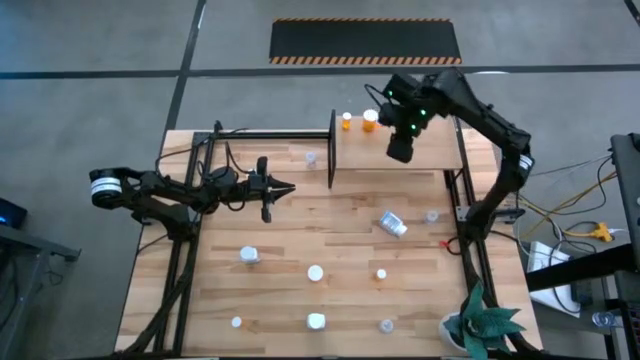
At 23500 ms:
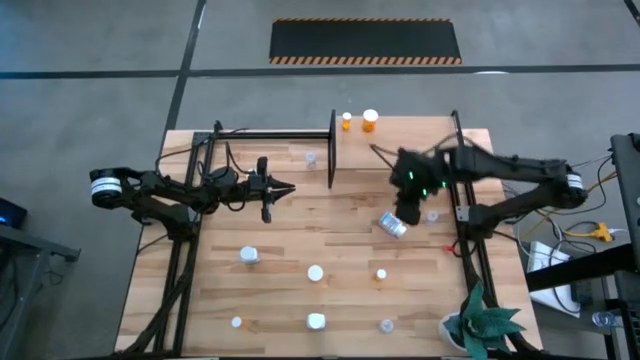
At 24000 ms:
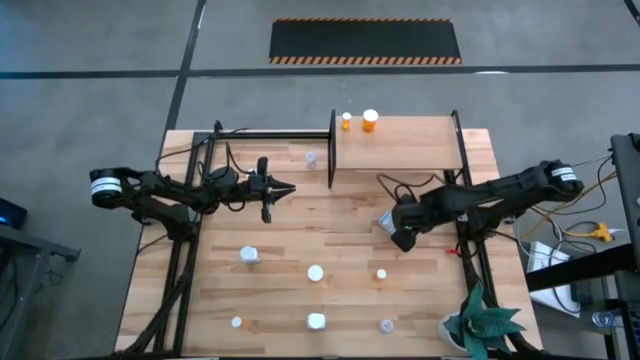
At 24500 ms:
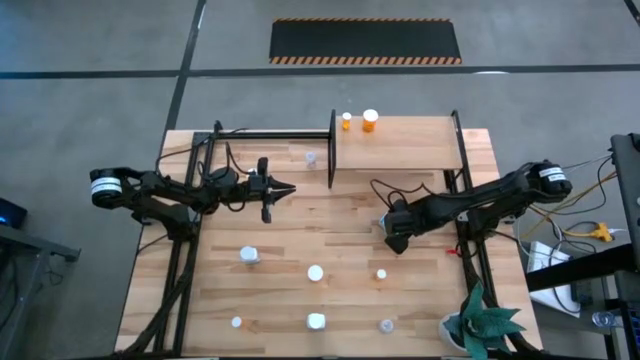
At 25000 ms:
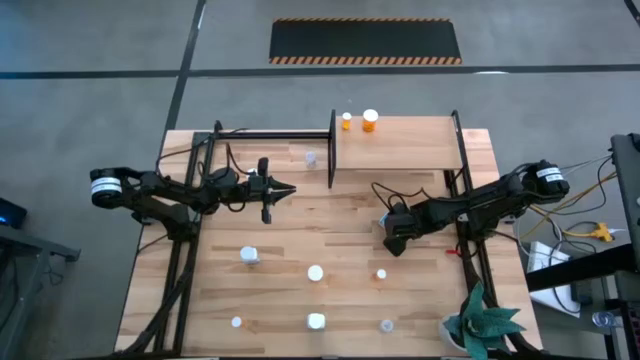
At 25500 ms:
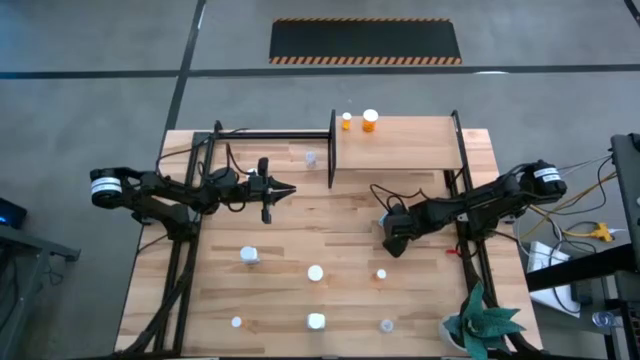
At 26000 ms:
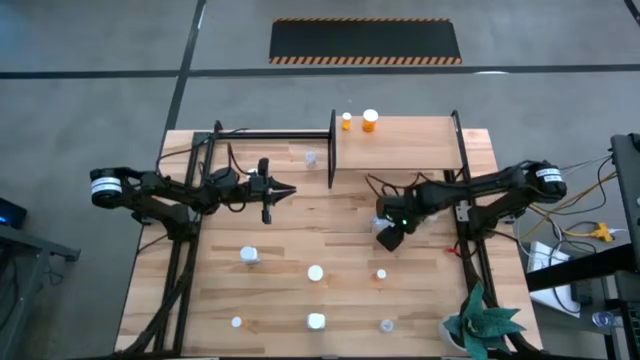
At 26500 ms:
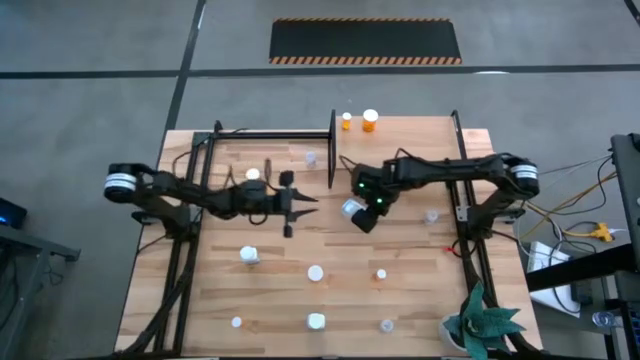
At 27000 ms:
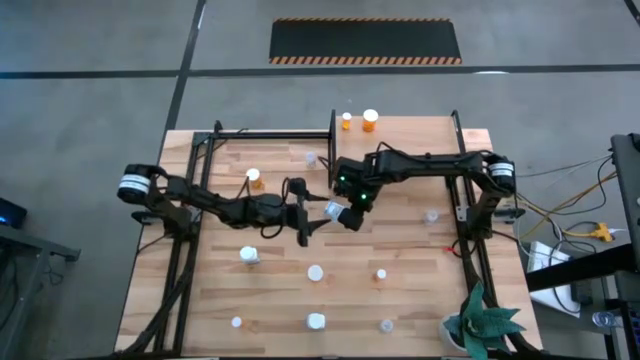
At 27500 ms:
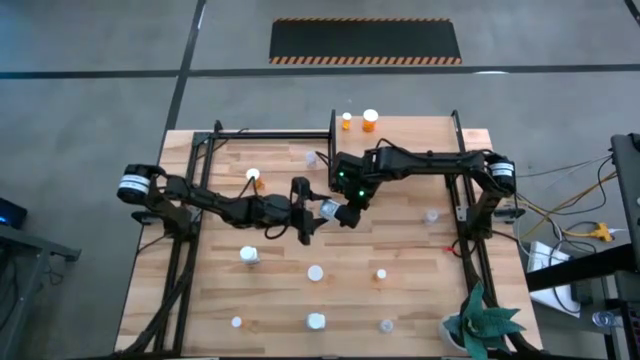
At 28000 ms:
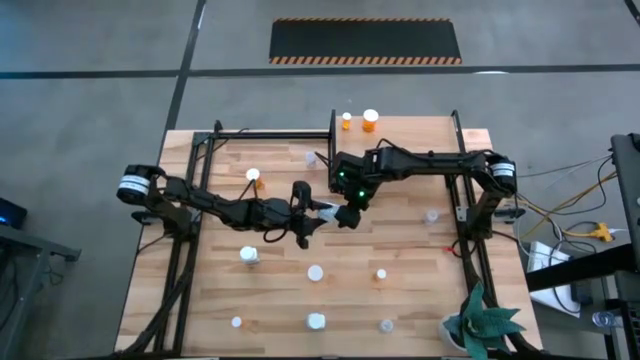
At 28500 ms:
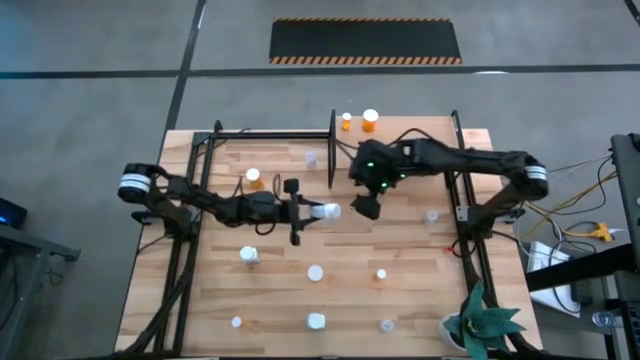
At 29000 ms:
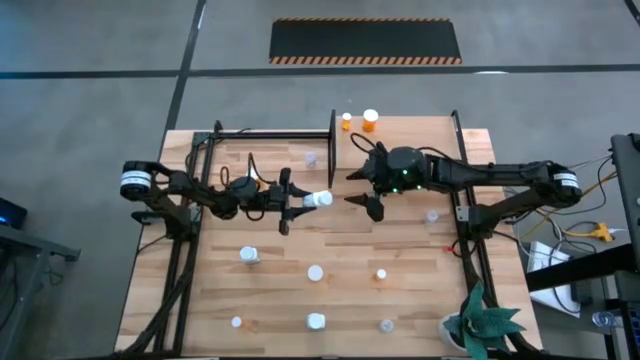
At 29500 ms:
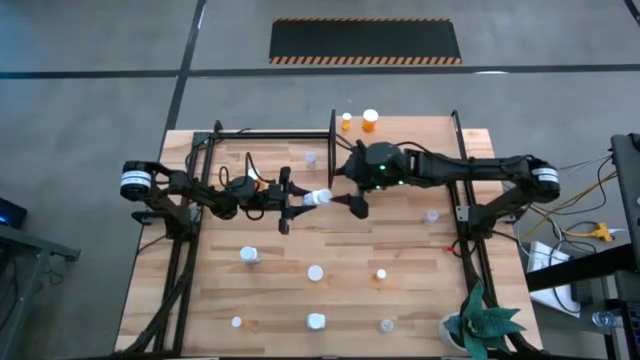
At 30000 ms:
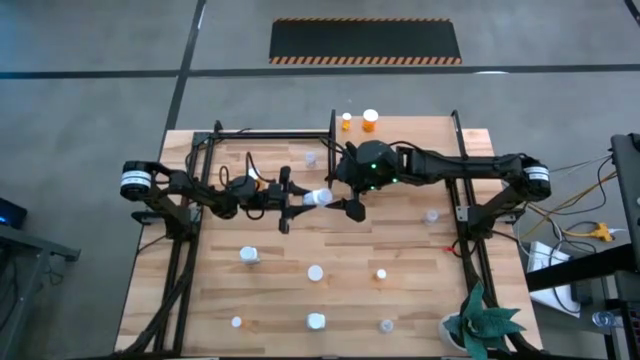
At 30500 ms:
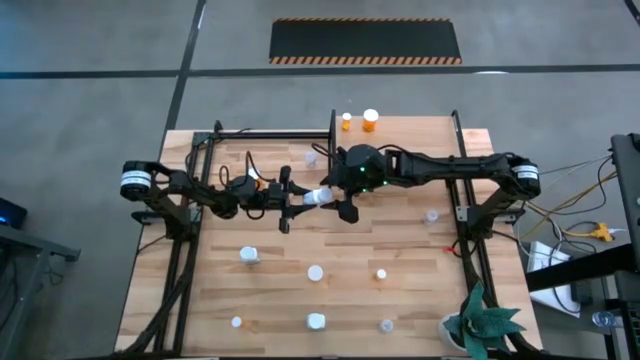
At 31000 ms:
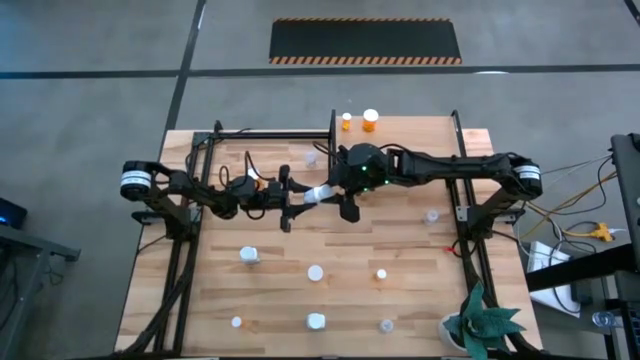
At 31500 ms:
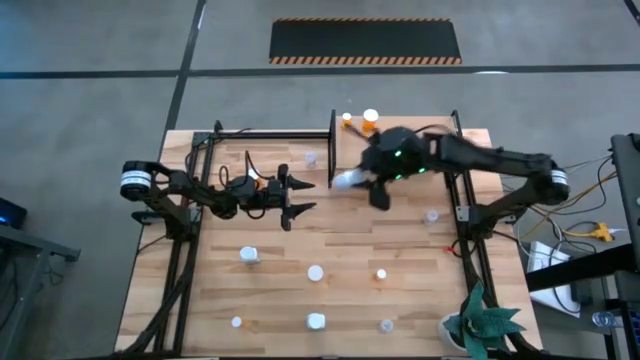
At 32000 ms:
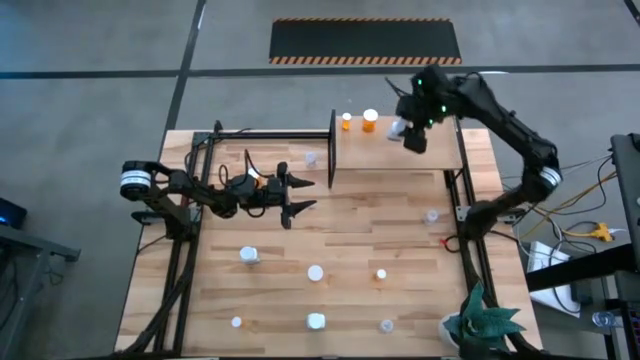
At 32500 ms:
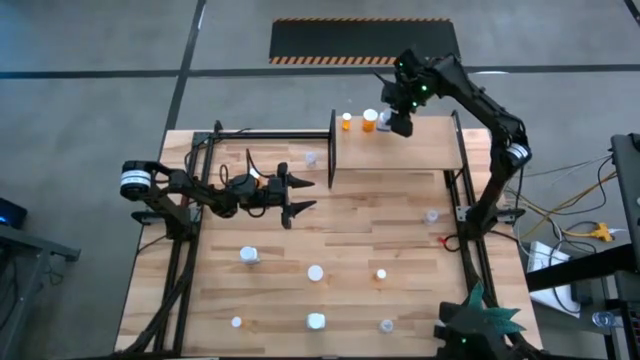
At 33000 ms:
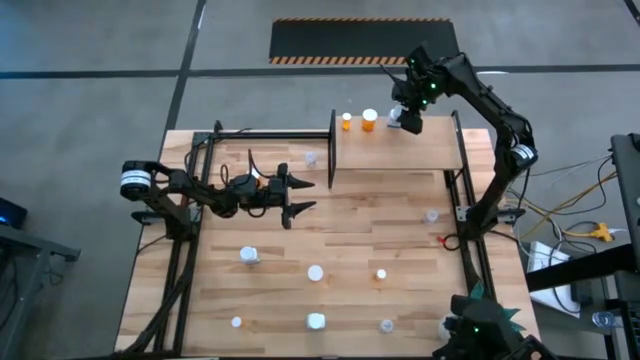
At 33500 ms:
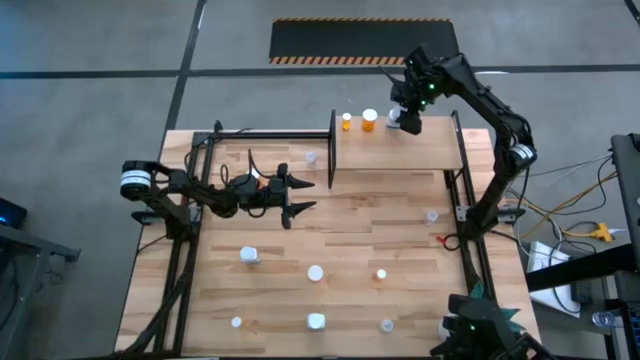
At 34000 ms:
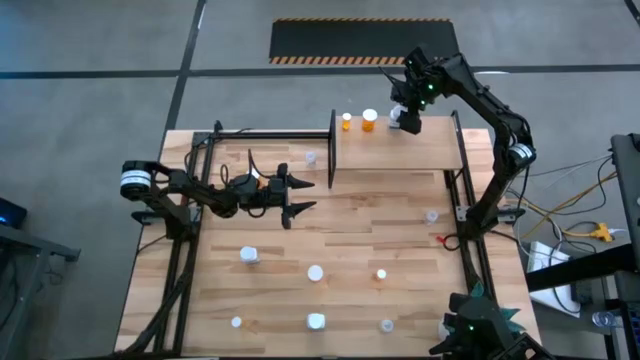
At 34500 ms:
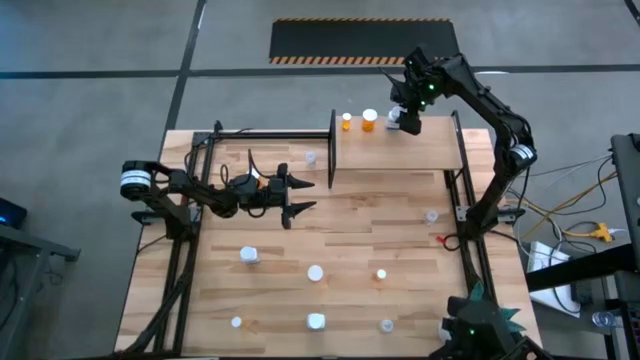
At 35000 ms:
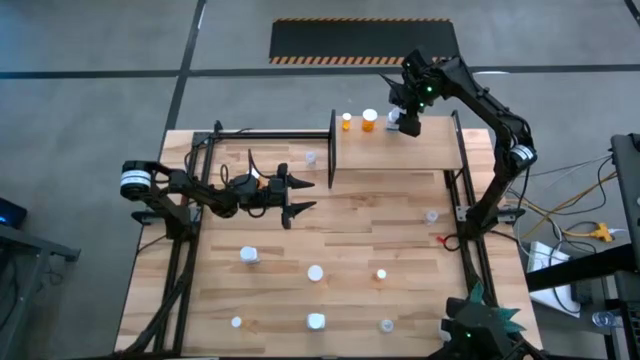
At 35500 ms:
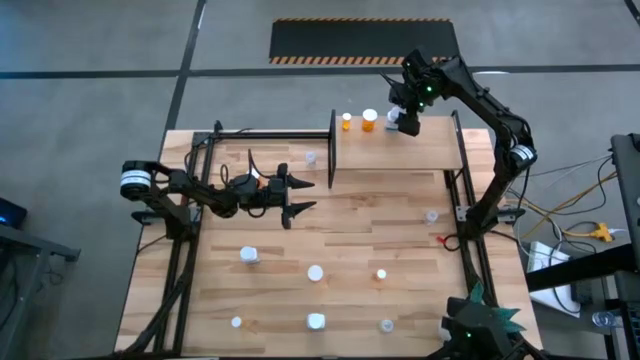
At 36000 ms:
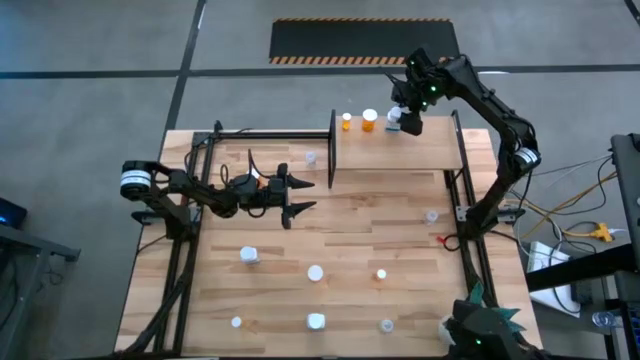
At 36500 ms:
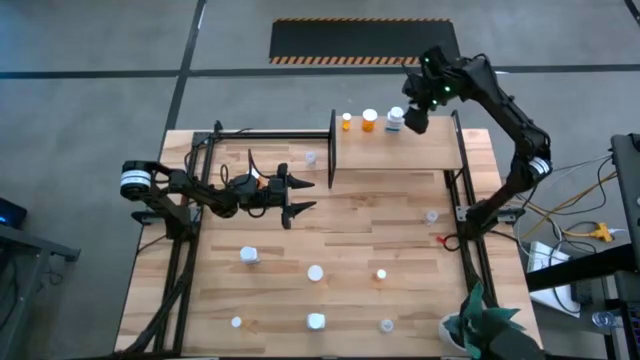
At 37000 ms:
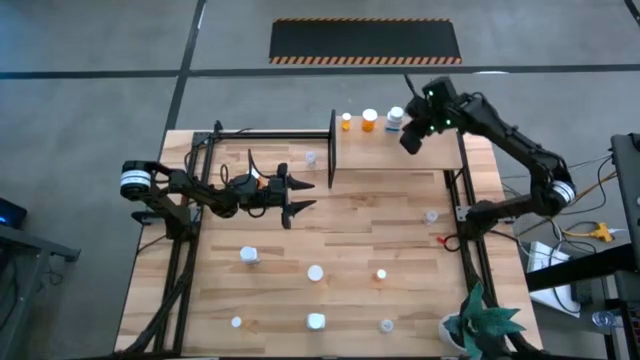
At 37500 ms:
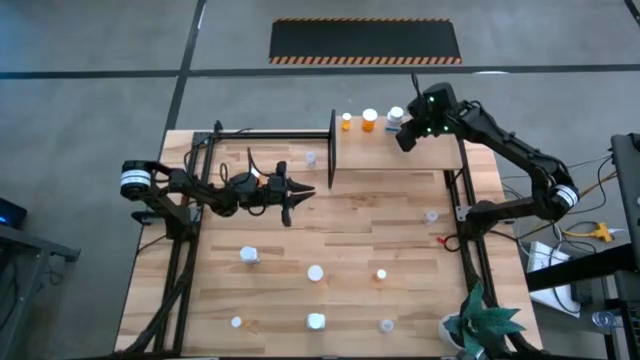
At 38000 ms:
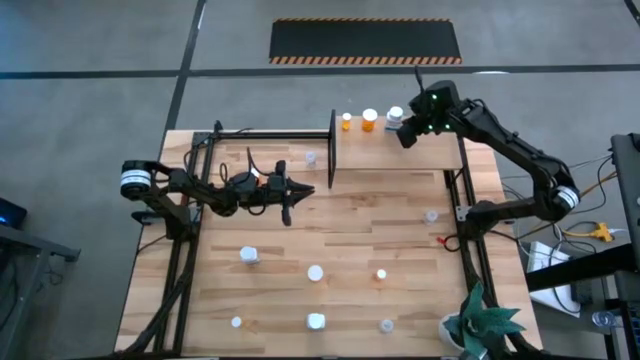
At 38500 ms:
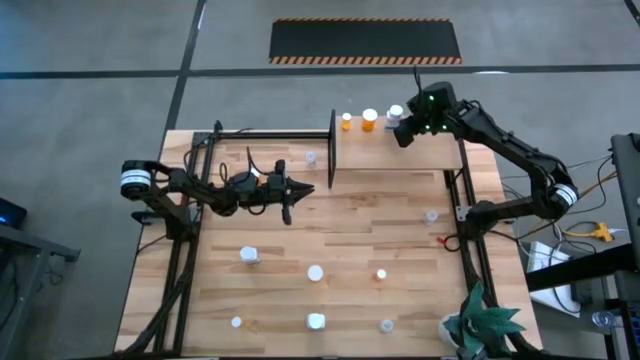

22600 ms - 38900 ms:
Task: Pick and place medicine bottles onto shelf by color
Put the middle white pill bottle on the shelf

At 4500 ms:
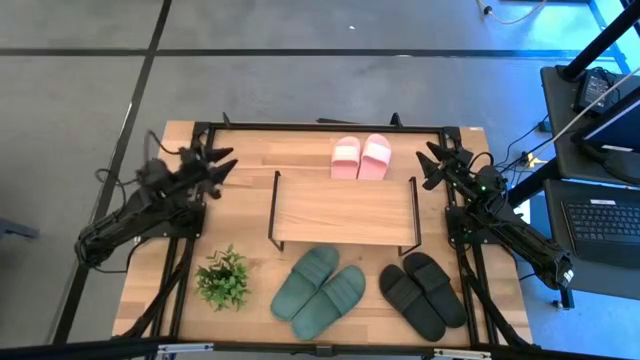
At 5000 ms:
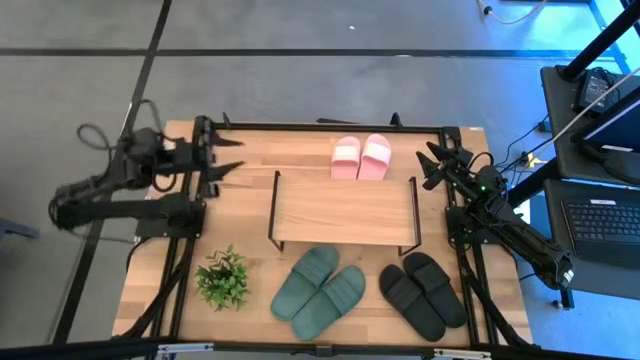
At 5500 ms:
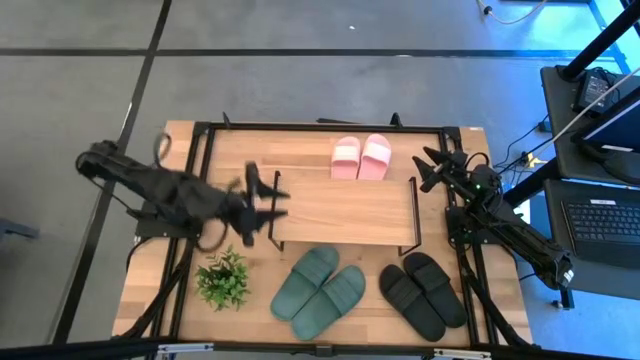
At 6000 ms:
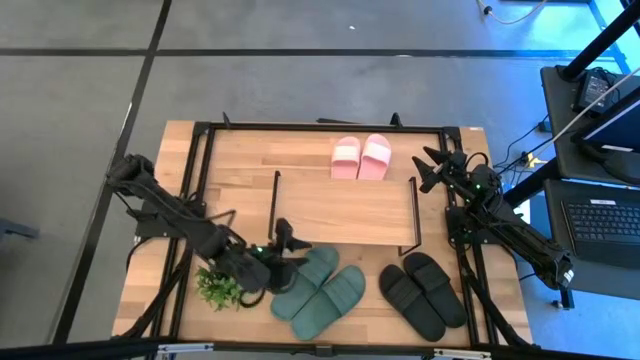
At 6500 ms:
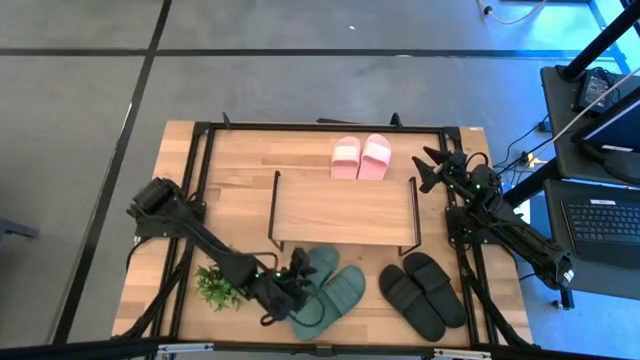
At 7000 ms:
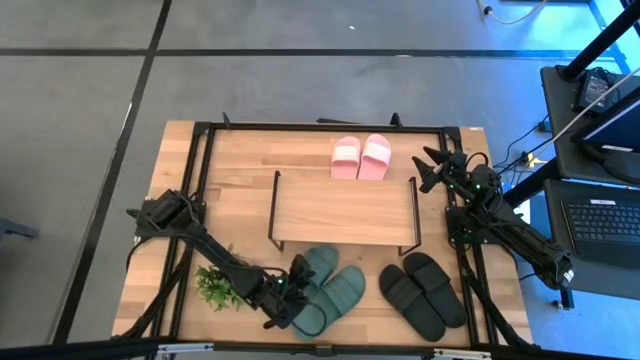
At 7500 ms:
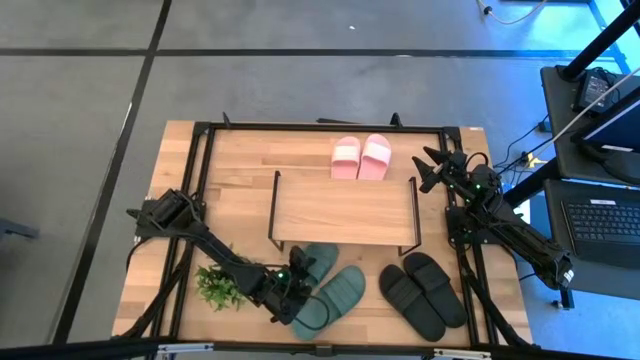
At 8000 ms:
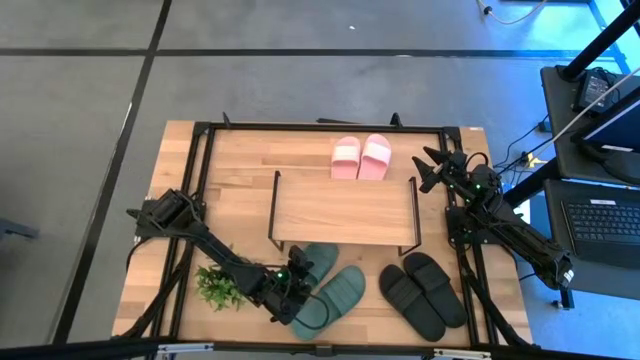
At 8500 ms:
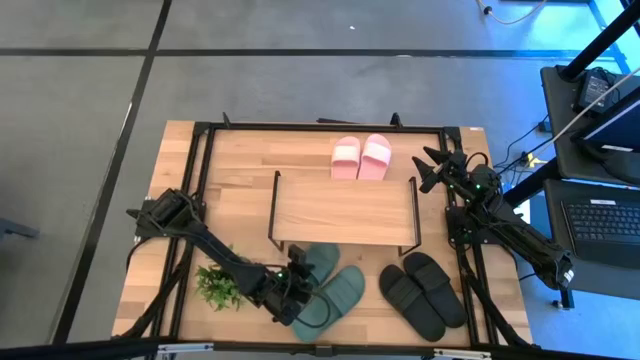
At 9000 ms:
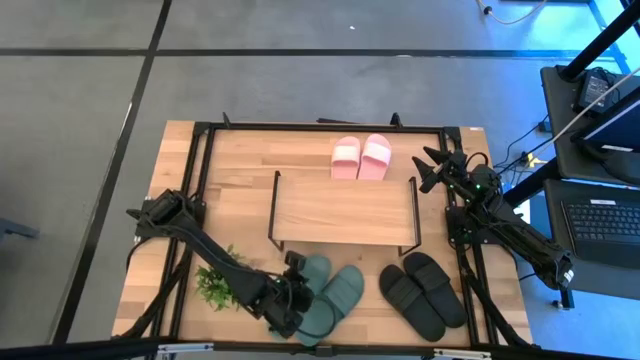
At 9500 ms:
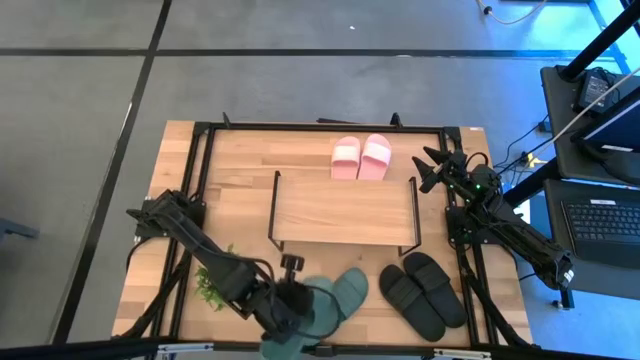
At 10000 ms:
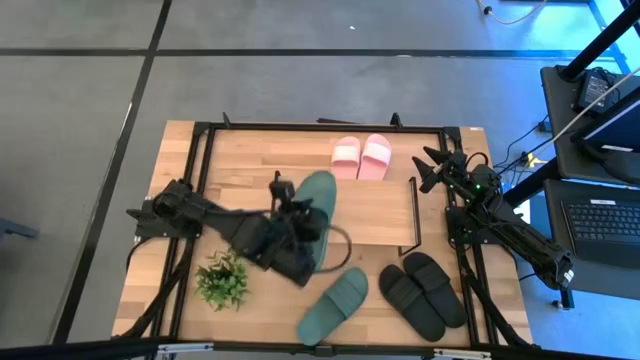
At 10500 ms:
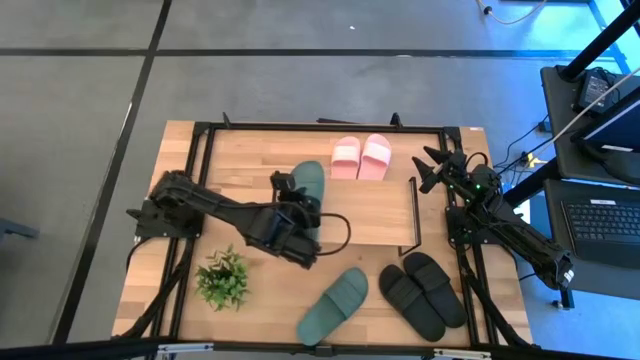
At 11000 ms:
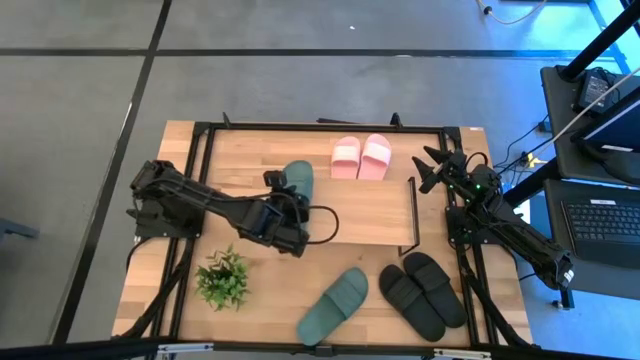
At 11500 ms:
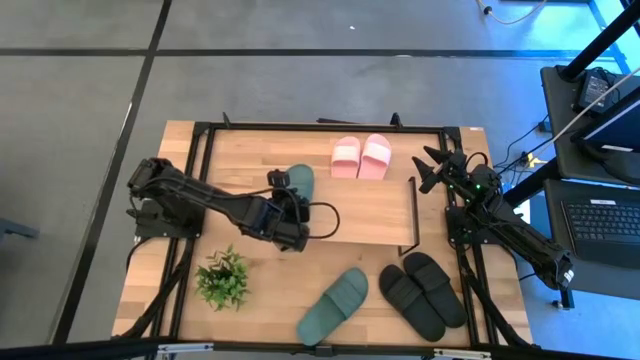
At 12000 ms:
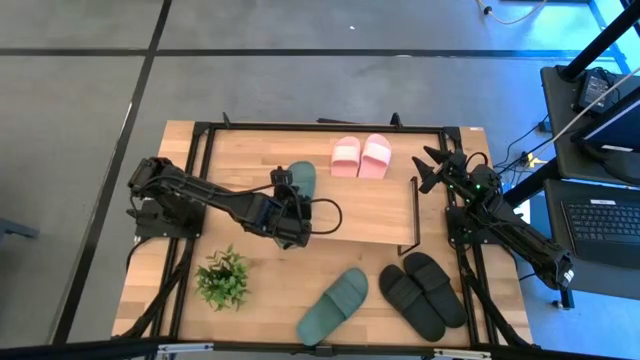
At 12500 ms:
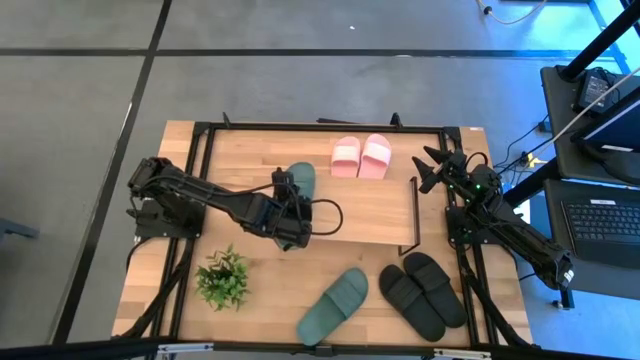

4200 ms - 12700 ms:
Task: Pick and place slides into the shelf
Put the left green slipper on the shelf
